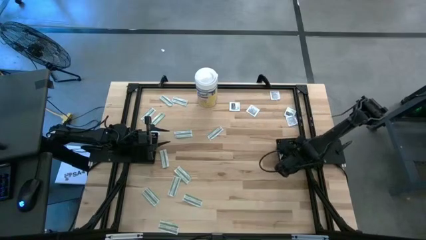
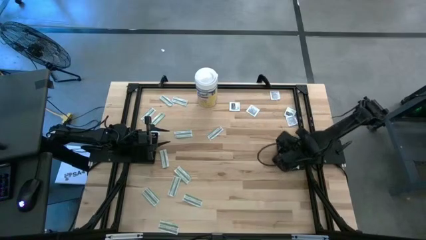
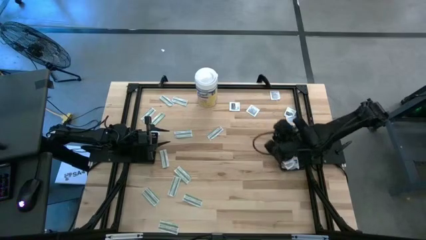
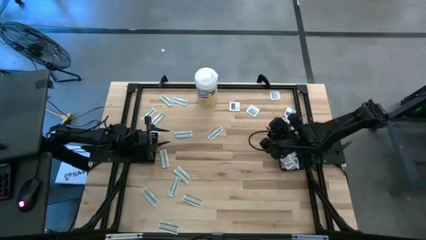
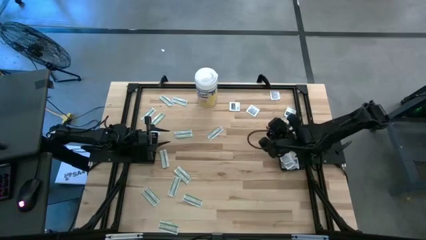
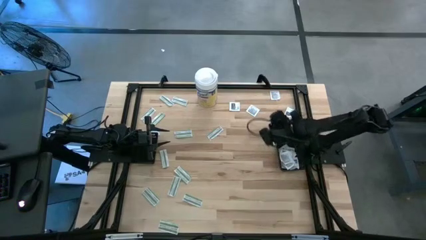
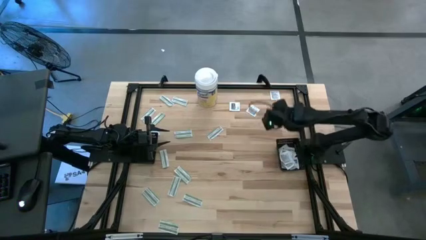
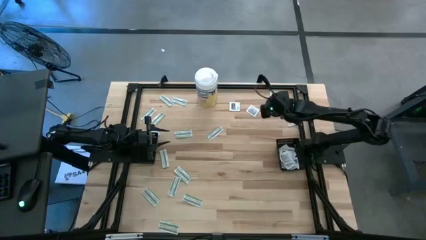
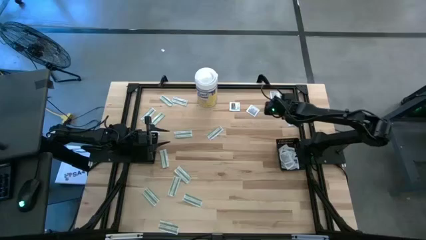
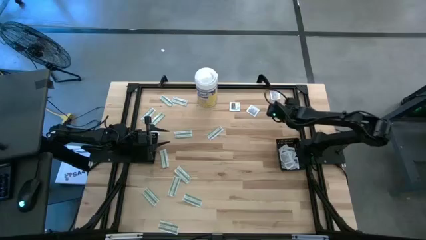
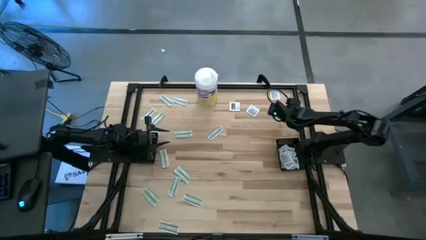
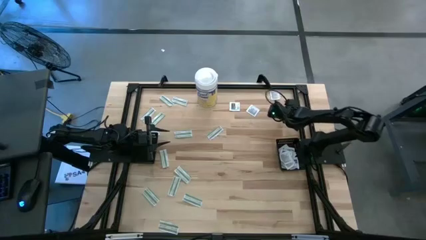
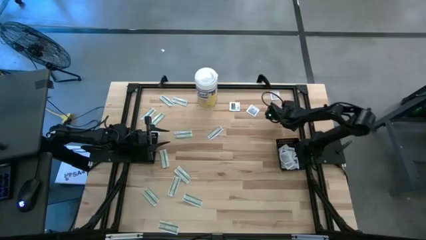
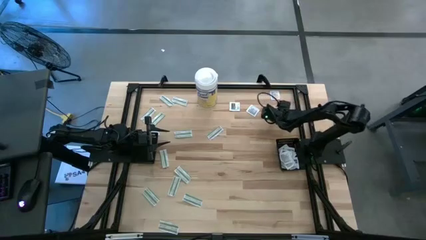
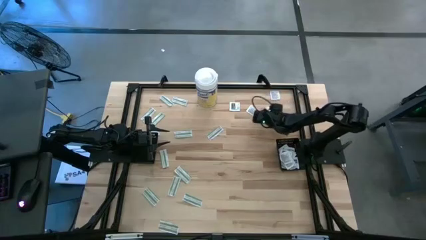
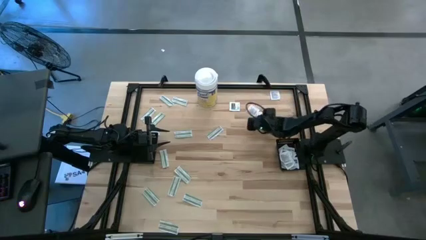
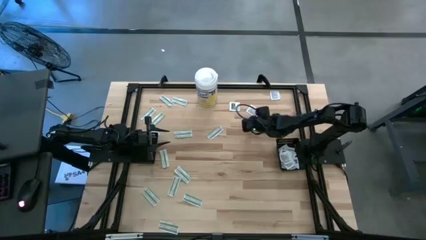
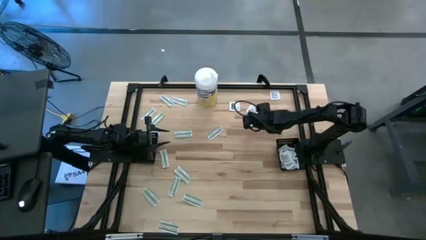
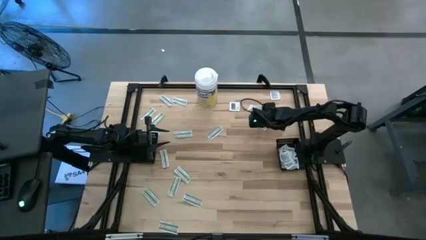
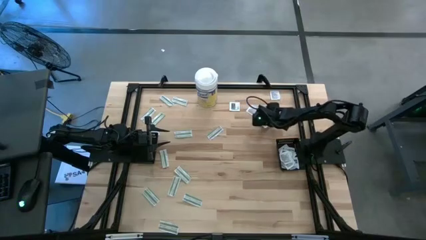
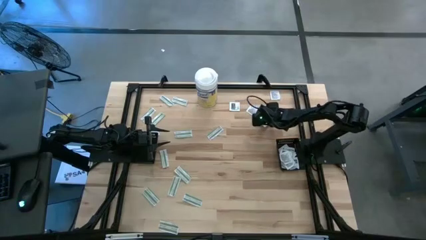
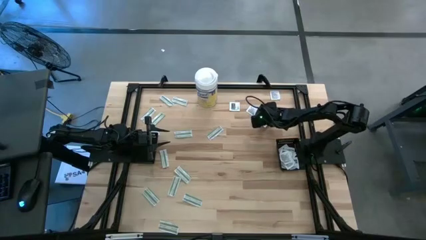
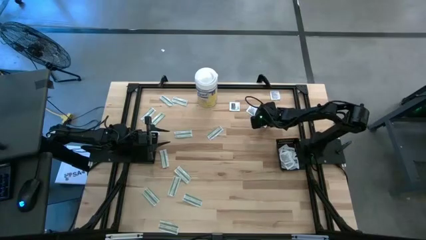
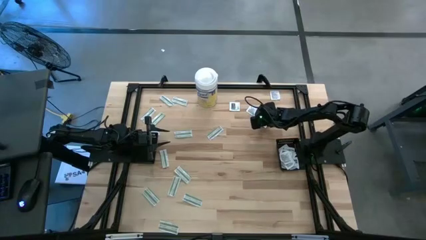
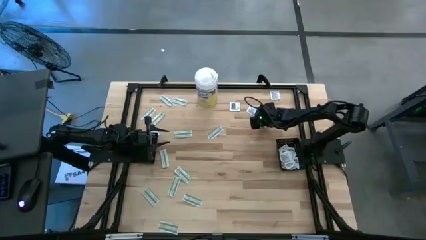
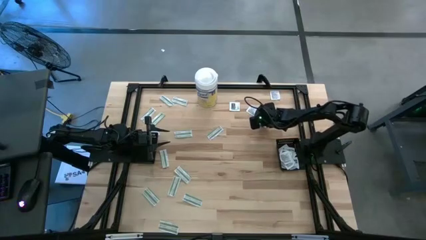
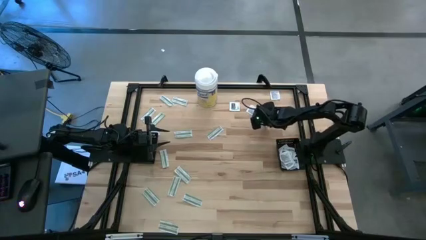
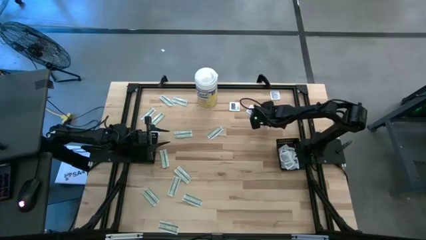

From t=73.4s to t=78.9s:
Task: Pick & Place First Aid Supplies
Put the towelette pack into the right black basket

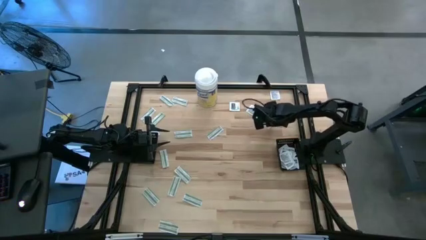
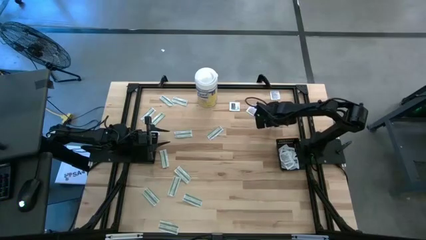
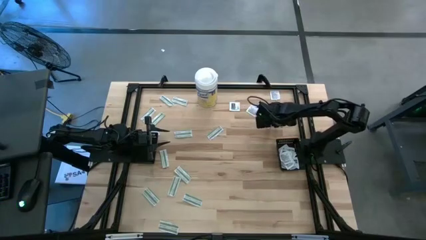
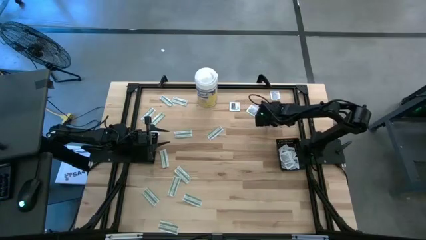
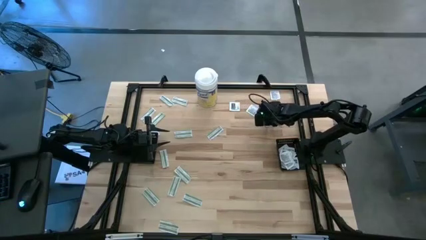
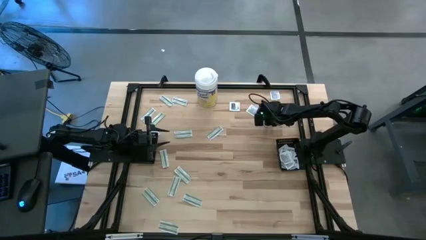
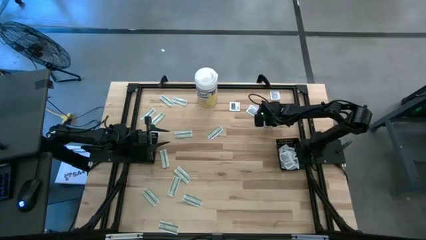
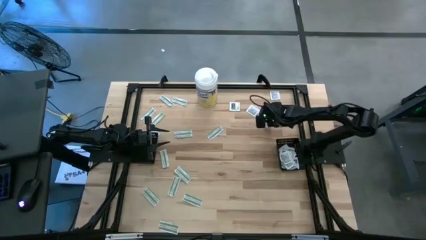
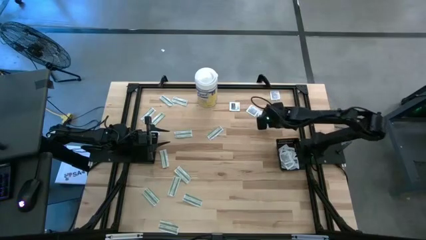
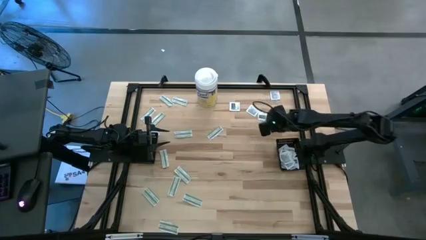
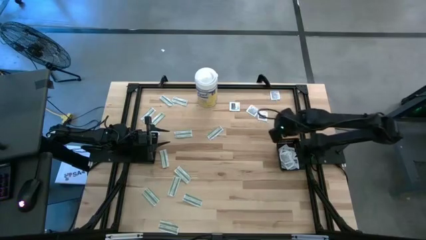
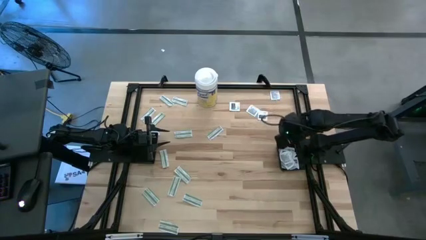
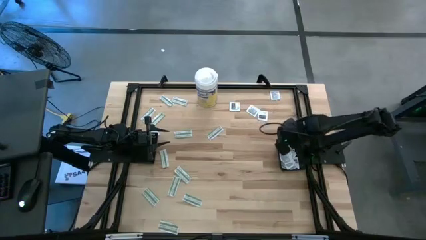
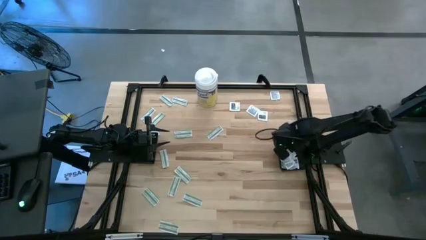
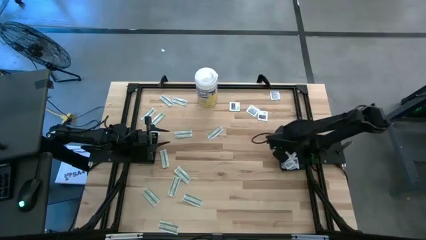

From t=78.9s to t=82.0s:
Put the towelette pack into the right black basket

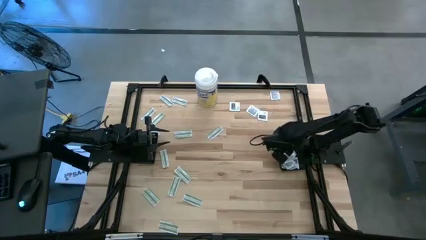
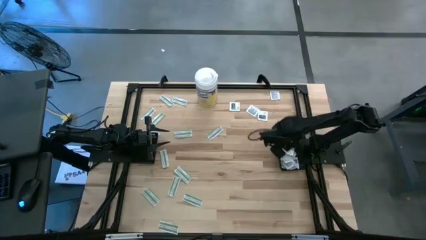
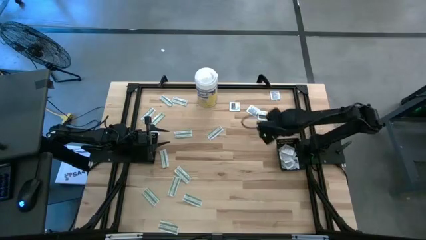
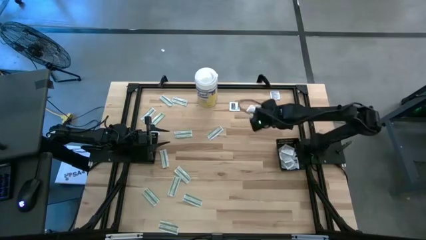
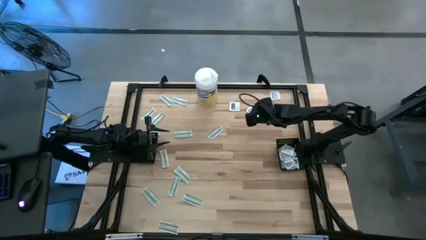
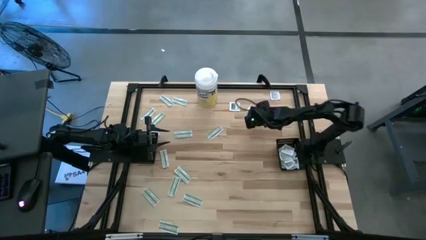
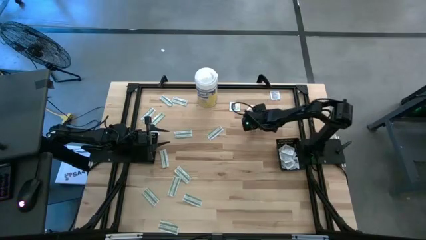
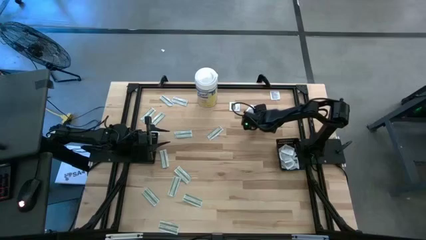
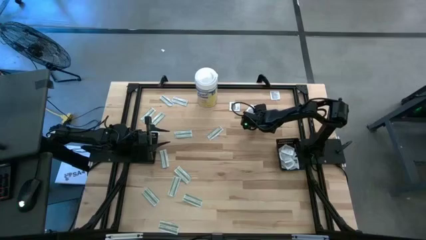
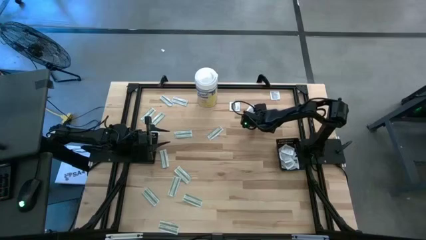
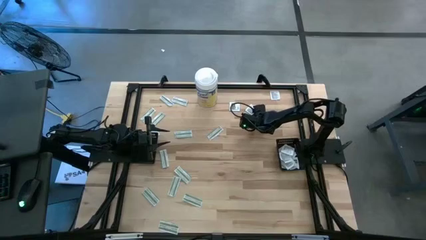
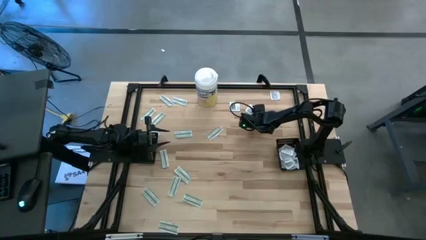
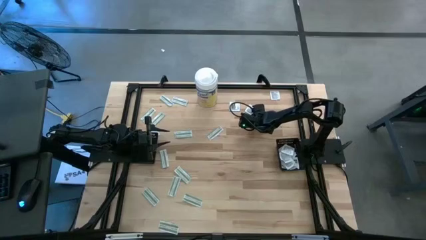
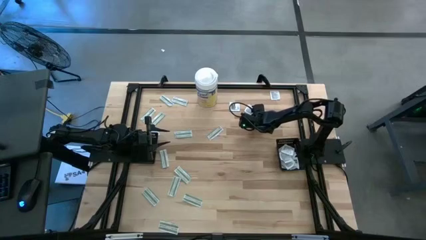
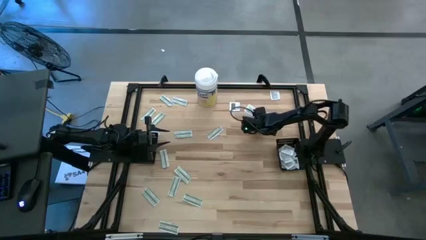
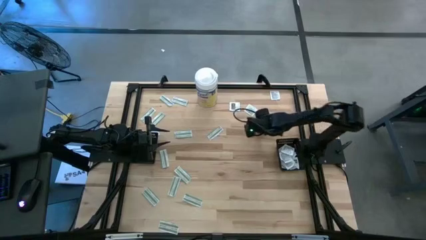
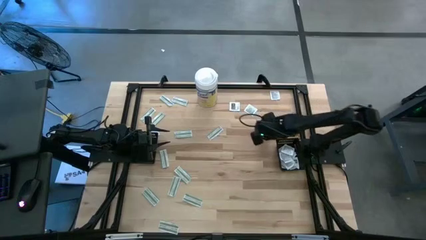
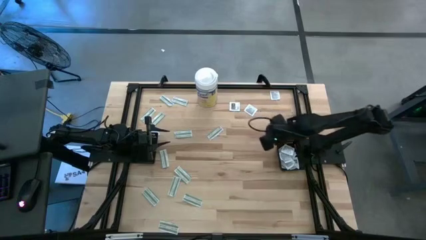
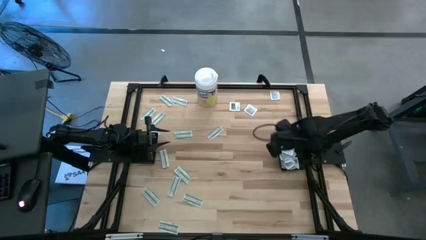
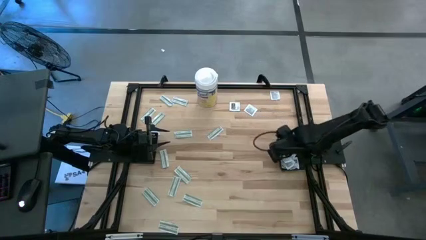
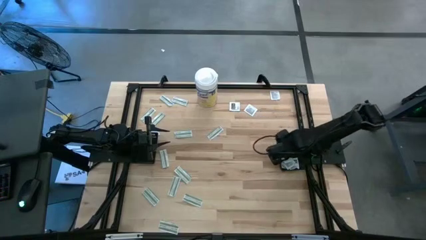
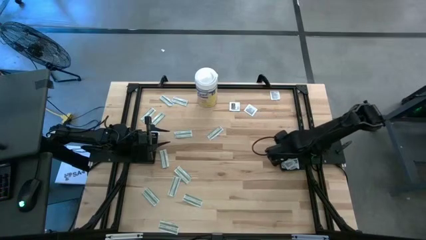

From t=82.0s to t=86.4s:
Put the towelette pack into the right black basket

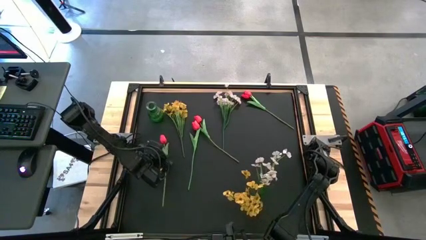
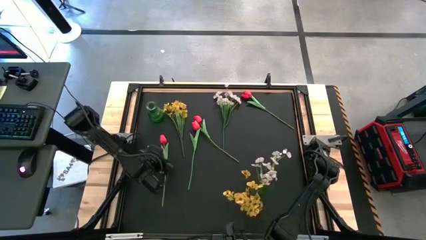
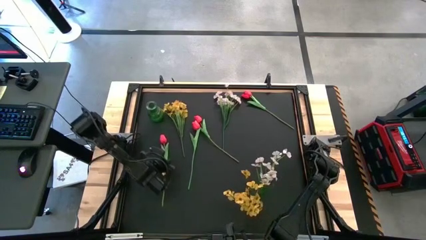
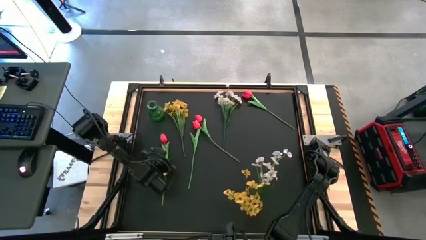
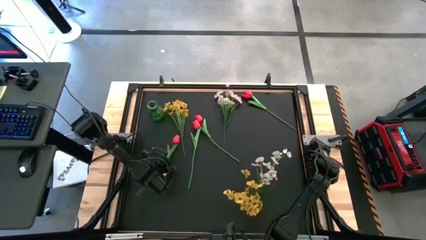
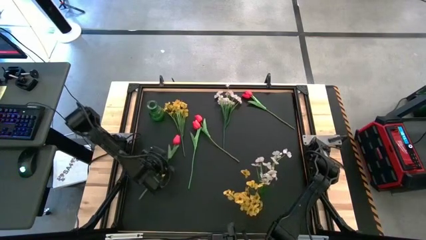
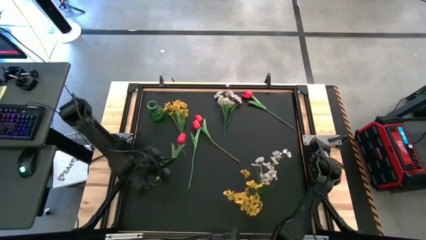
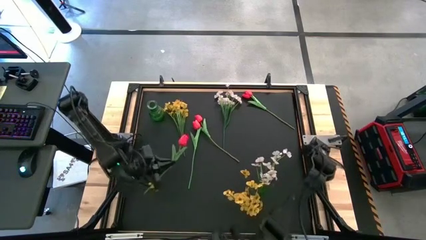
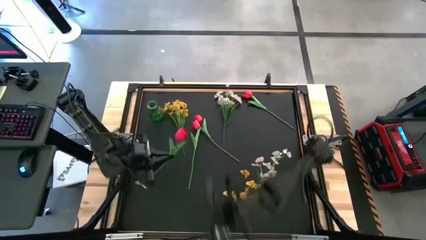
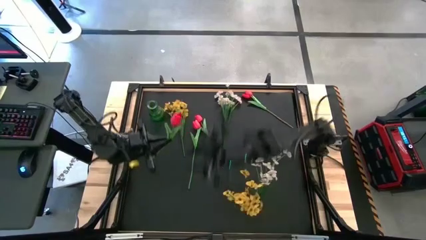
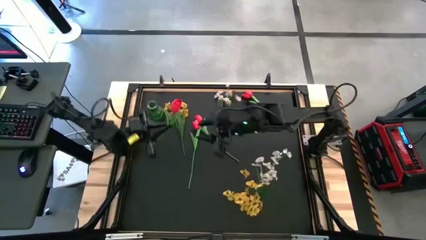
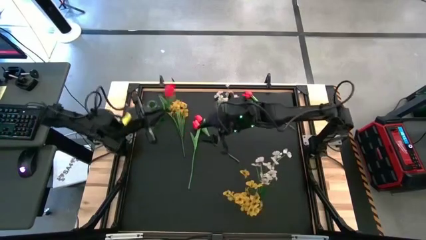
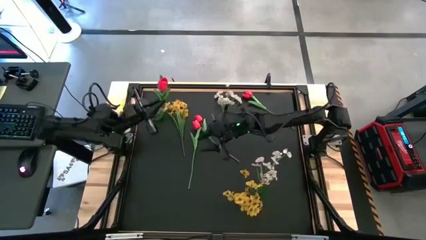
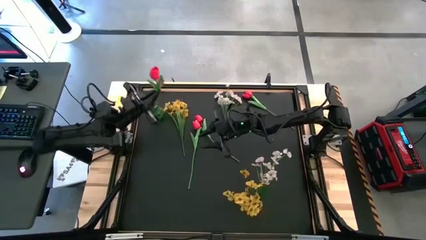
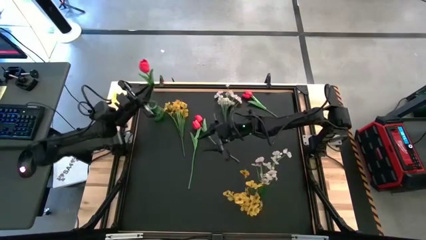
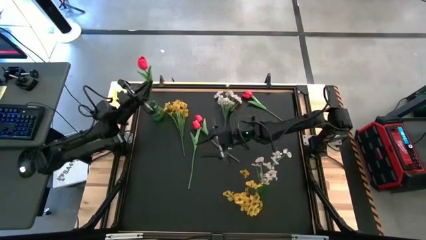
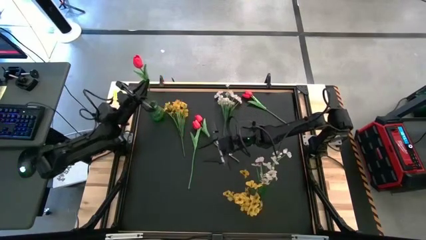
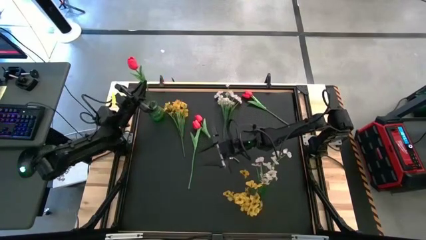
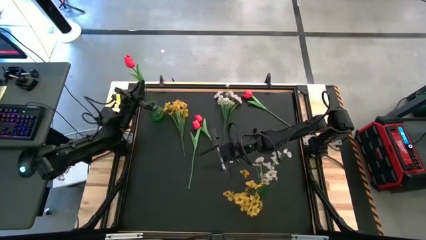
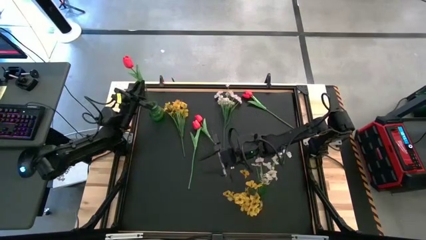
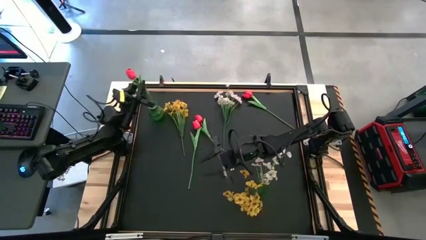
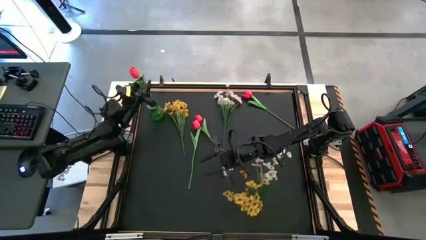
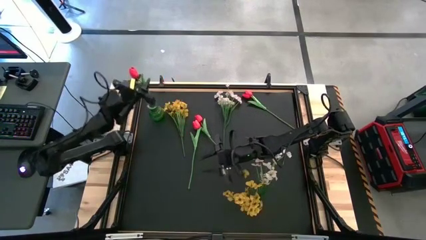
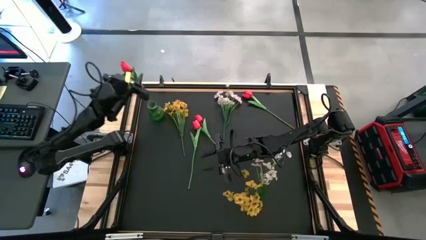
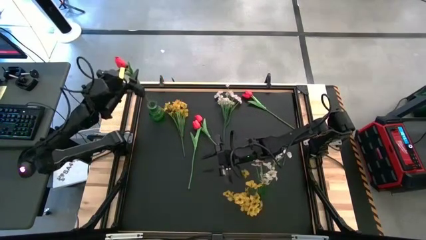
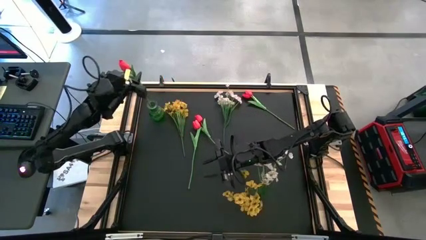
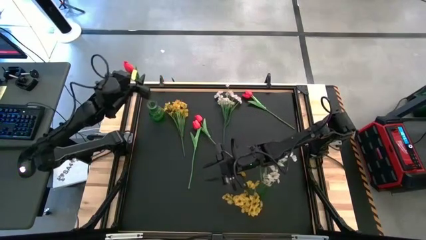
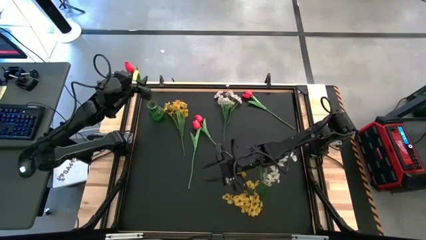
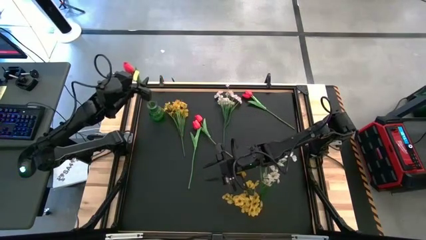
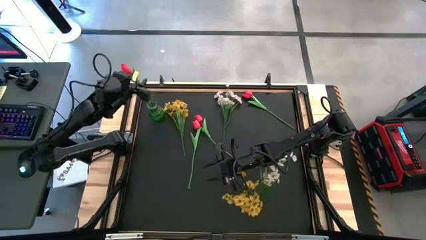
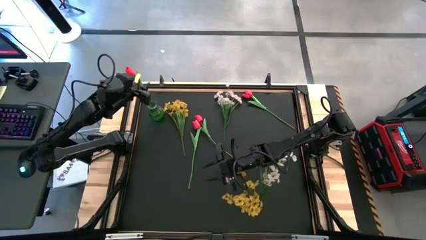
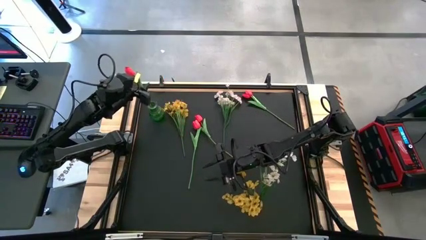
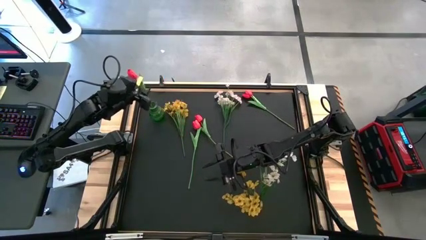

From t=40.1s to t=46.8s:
Task: Sort flowers into vase by color
Put the red tulip into the green vase
